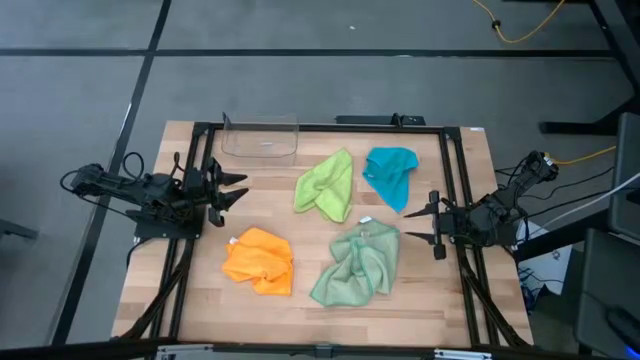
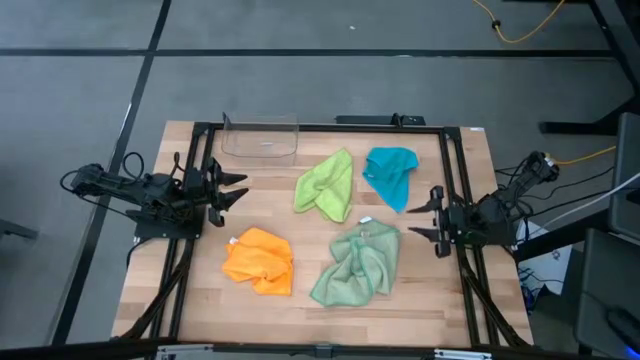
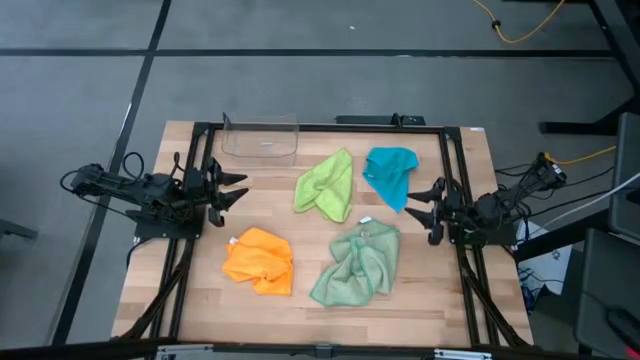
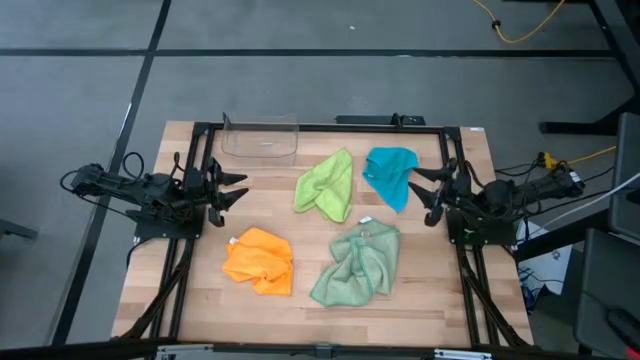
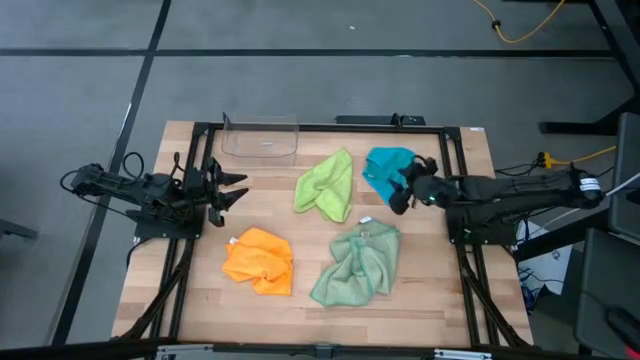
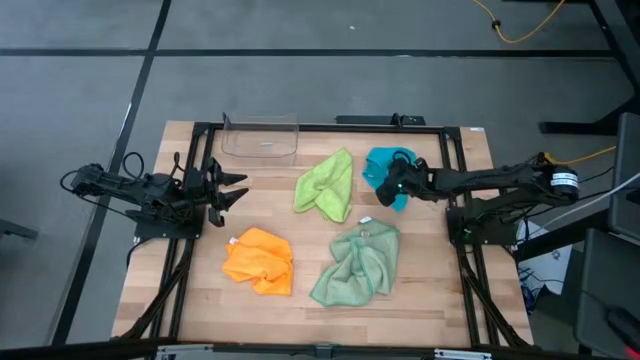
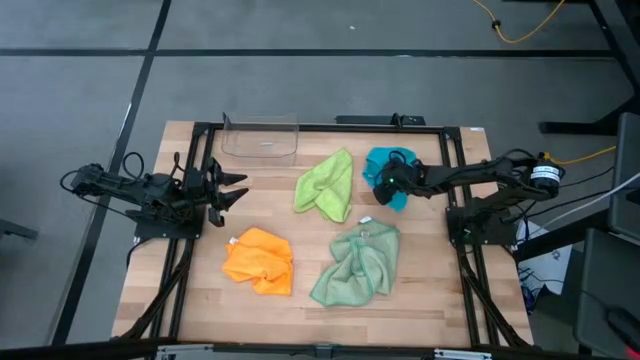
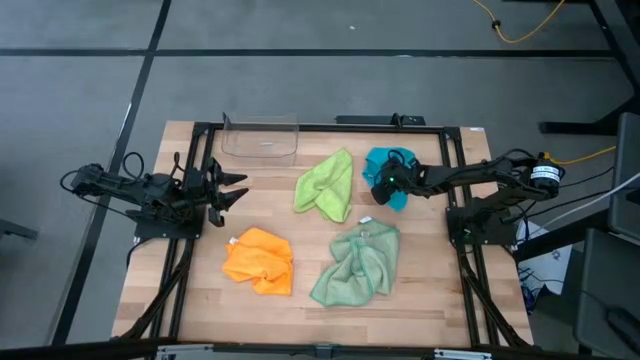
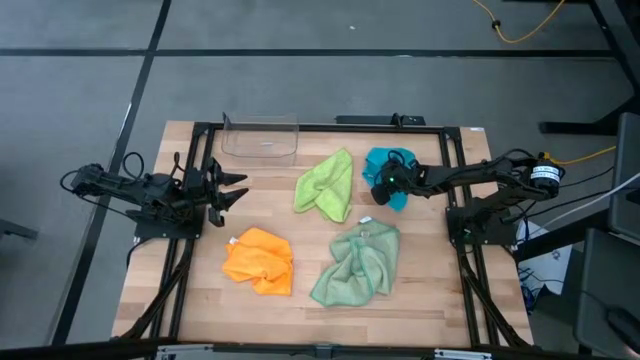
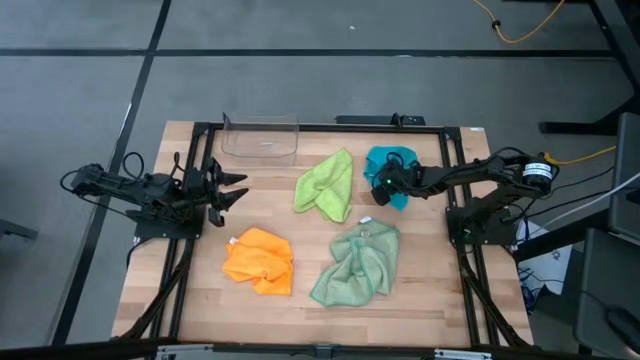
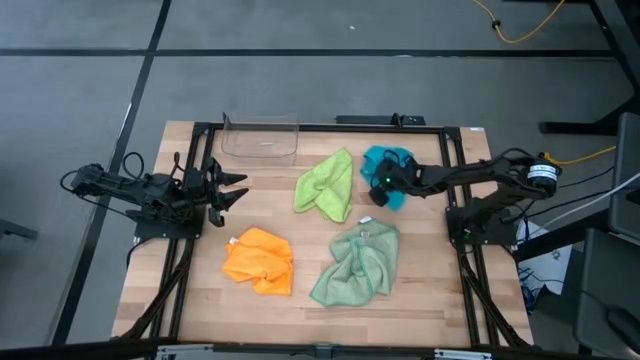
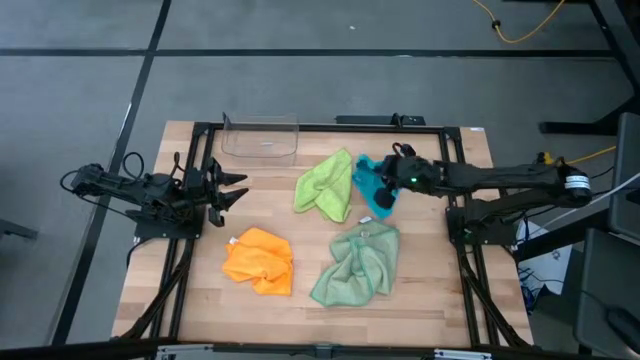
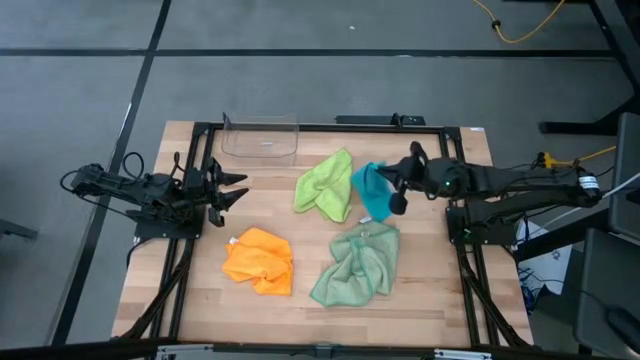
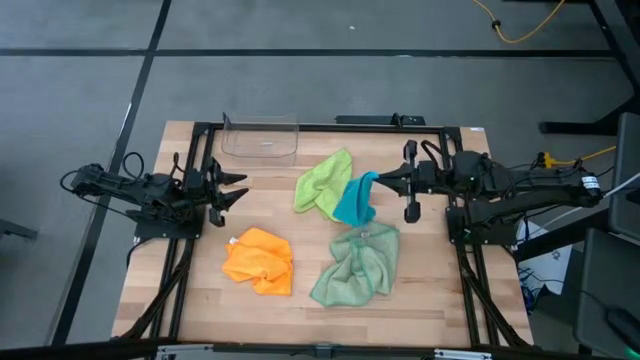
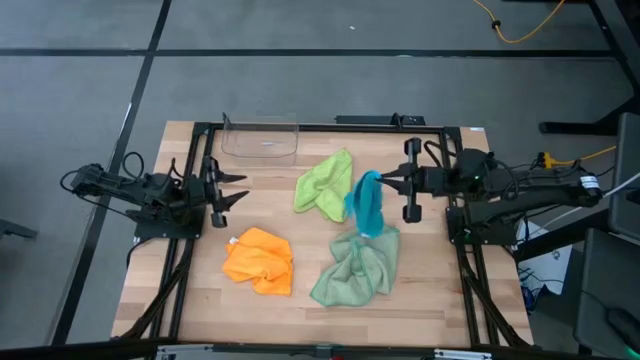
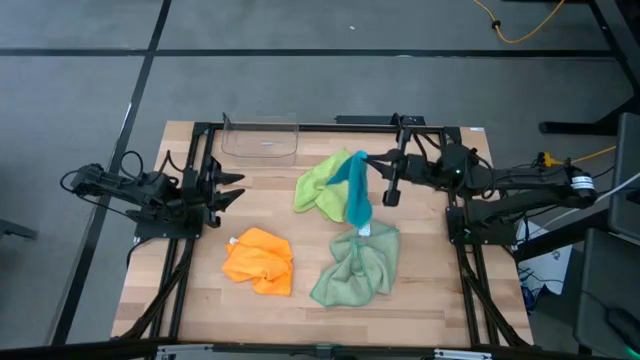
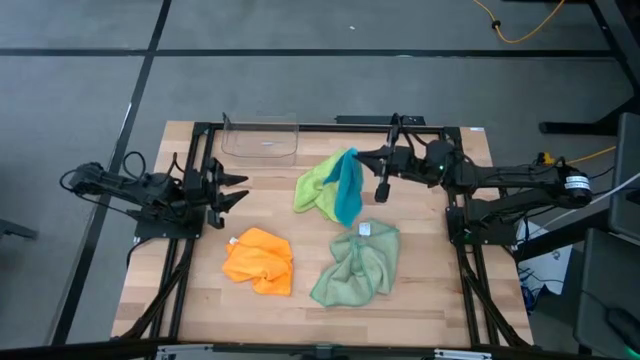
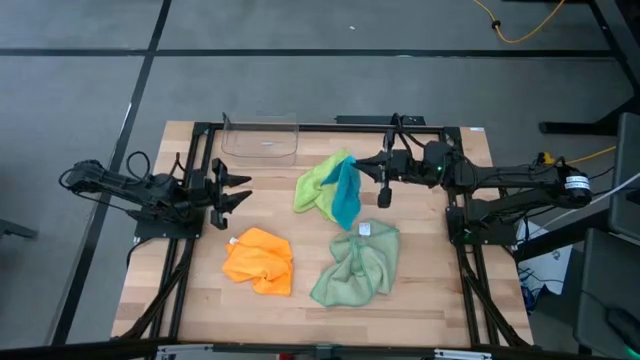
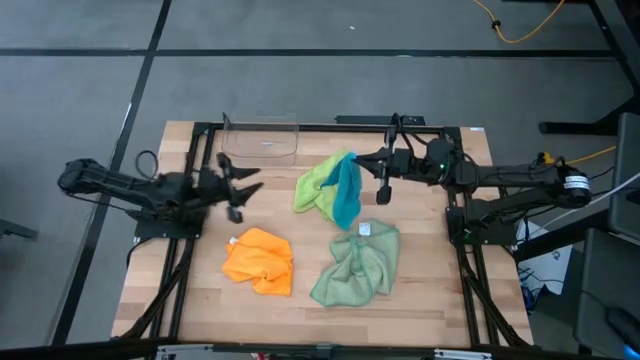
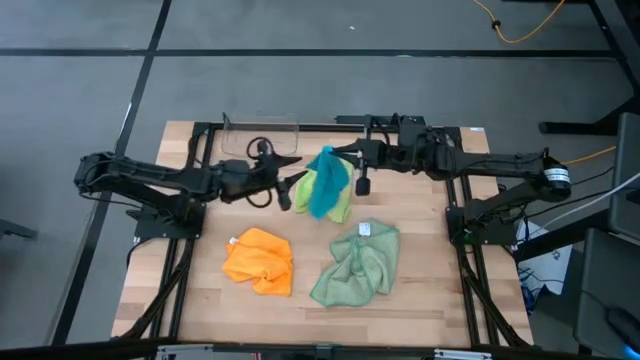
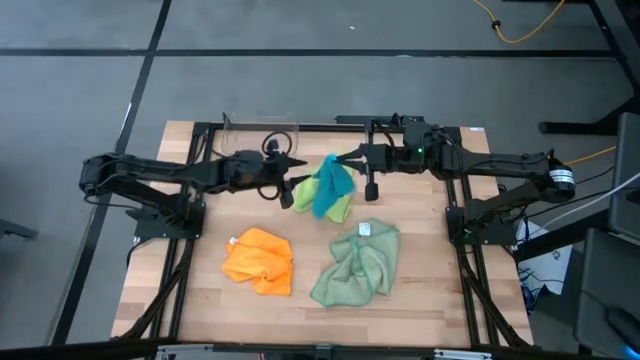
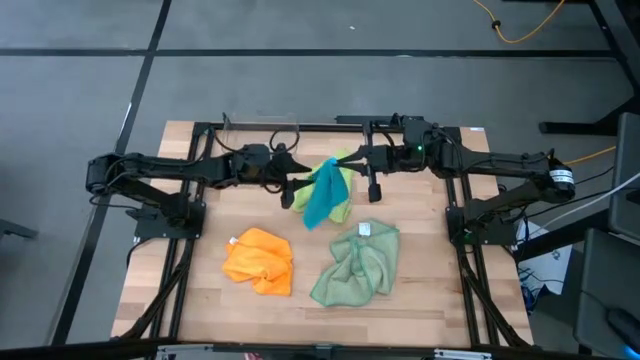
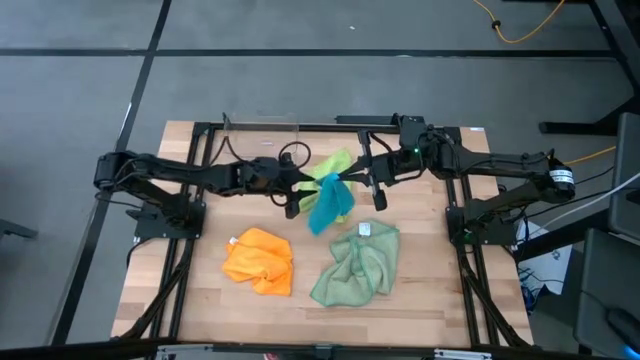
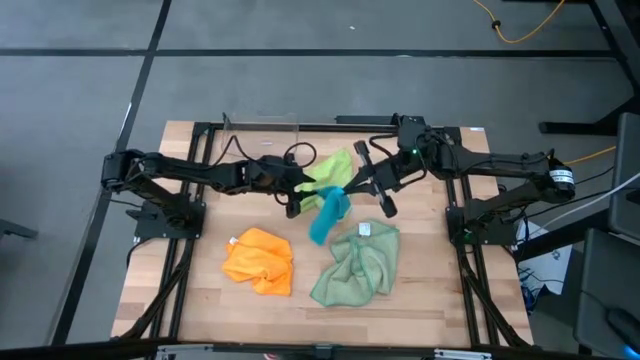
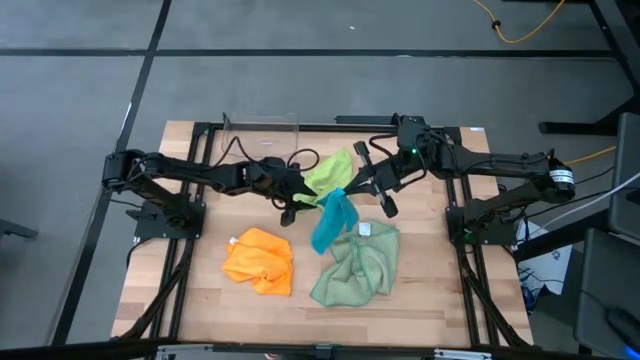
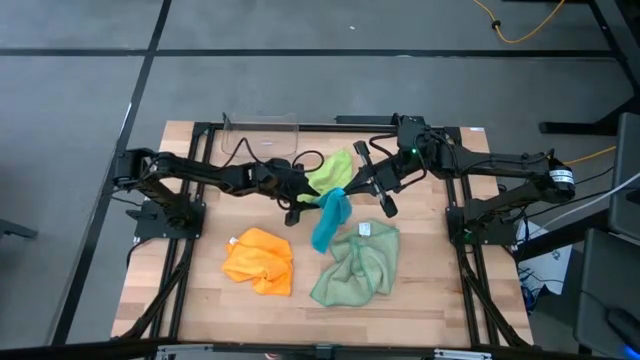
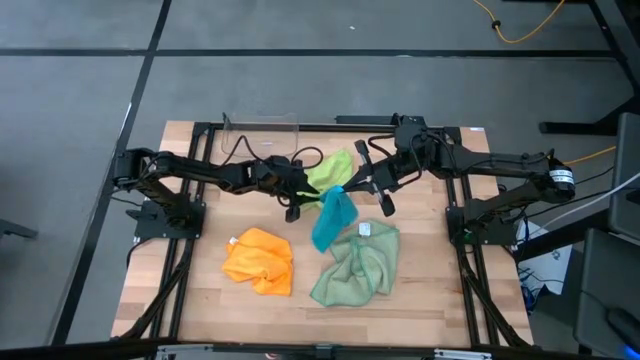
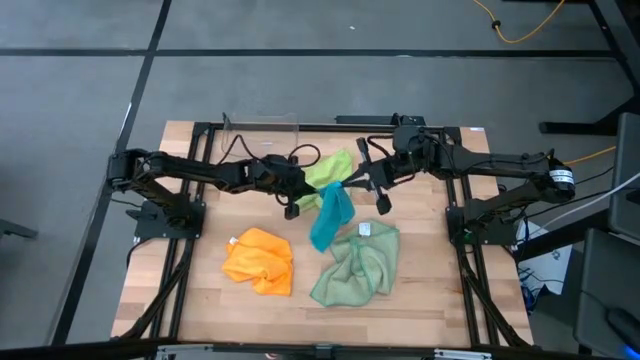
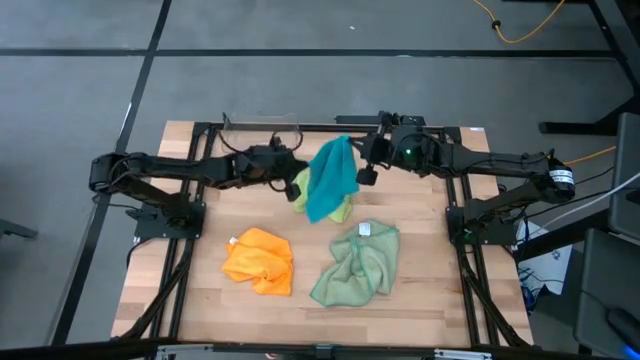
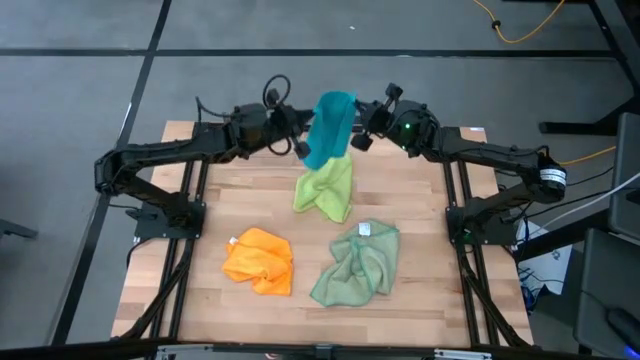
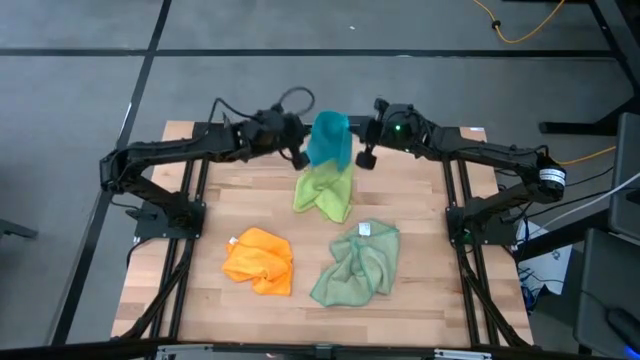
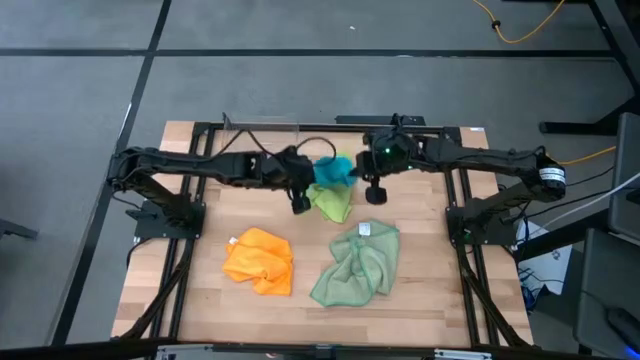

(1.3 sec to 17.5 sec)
Task: Fold microfiber towels
Fold the blue towel

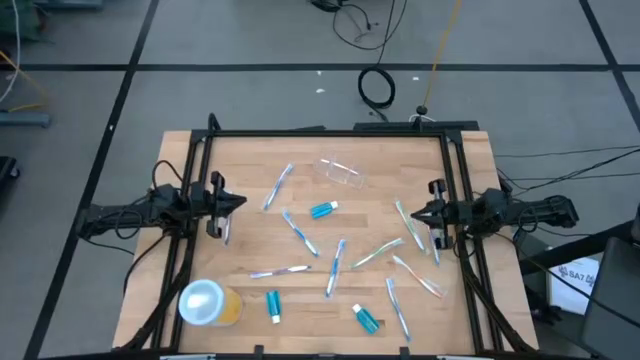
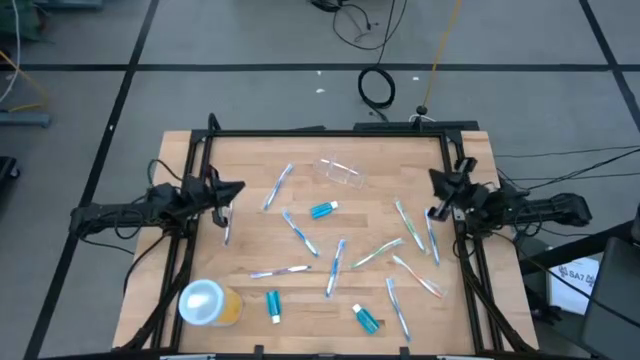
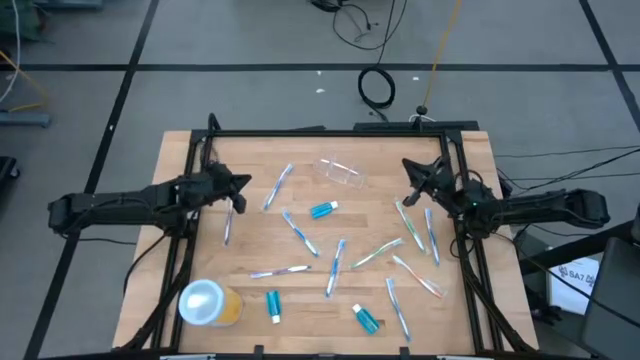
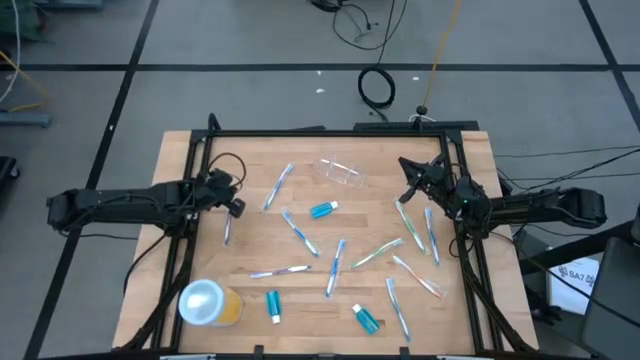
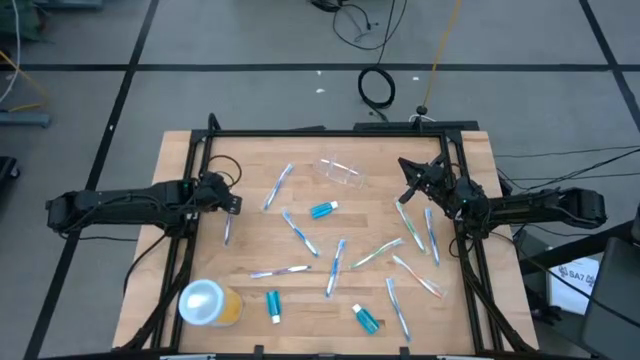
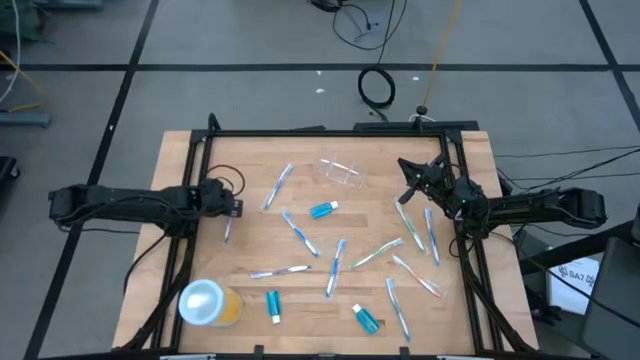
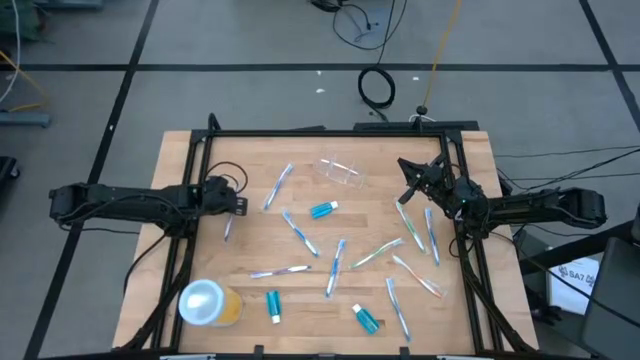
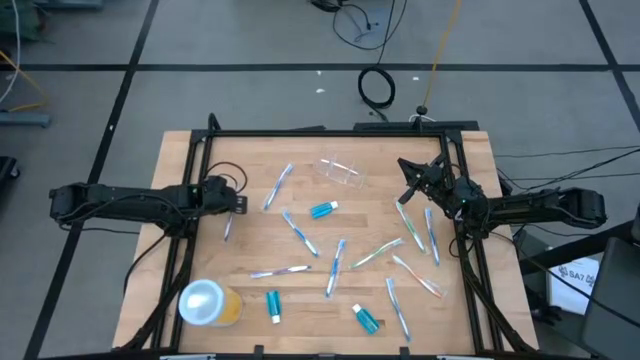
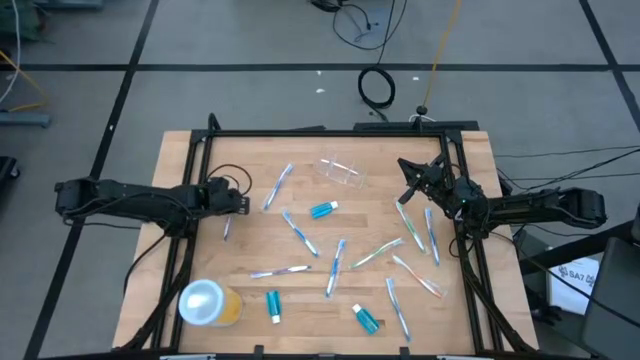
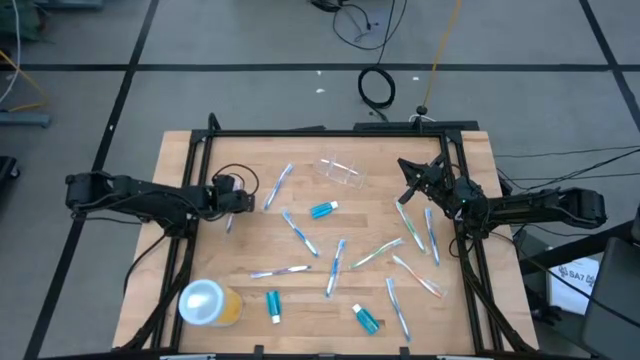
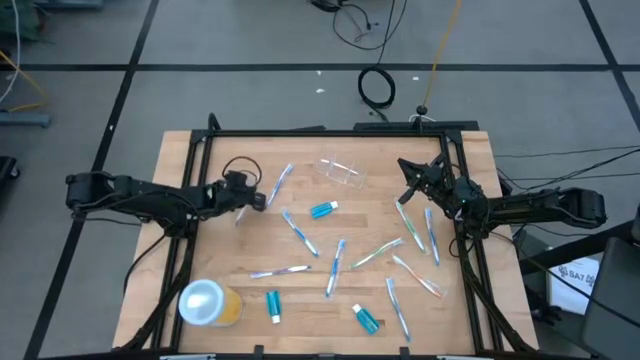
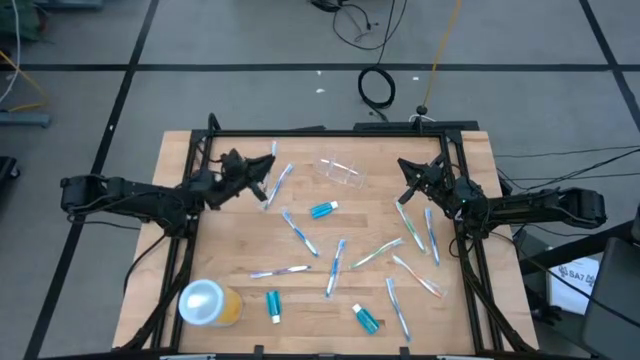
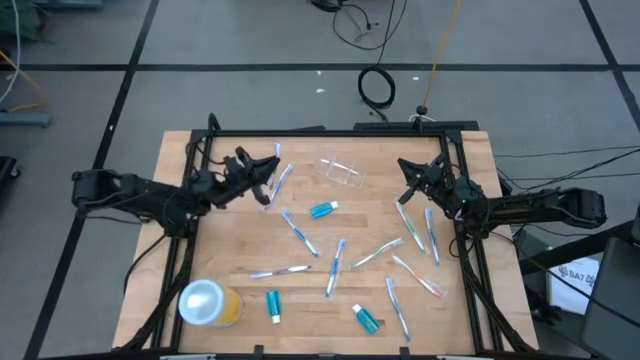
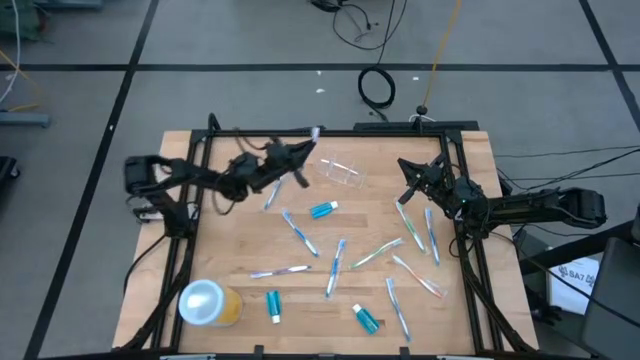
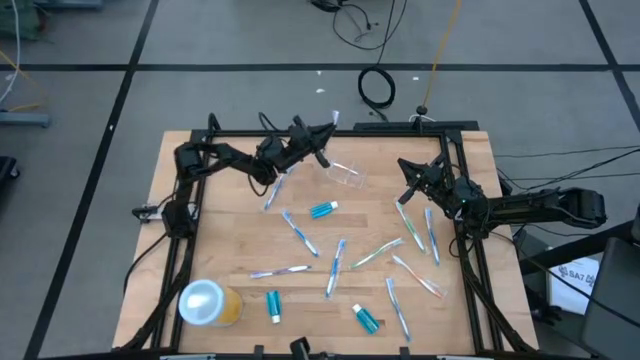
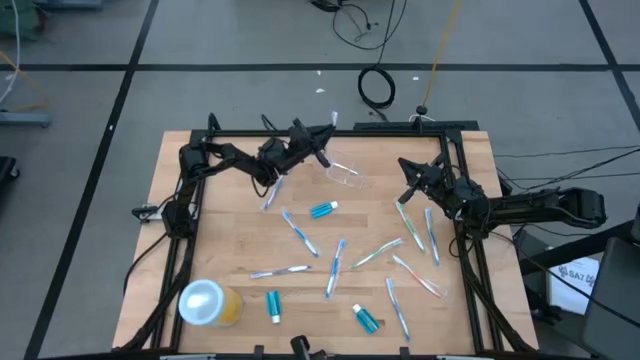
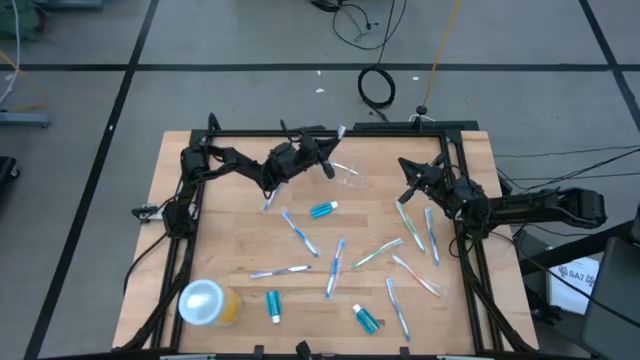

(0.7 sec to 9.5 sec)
Task: Pick & Place toothbrushing station
Put the top violet toothbrush into the transparent organizer
